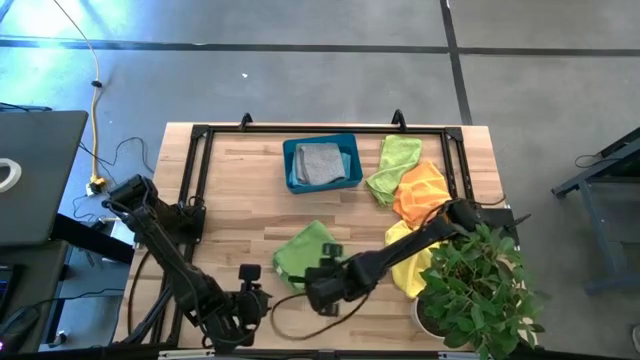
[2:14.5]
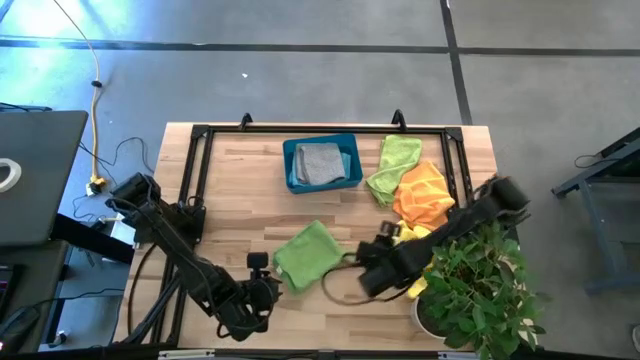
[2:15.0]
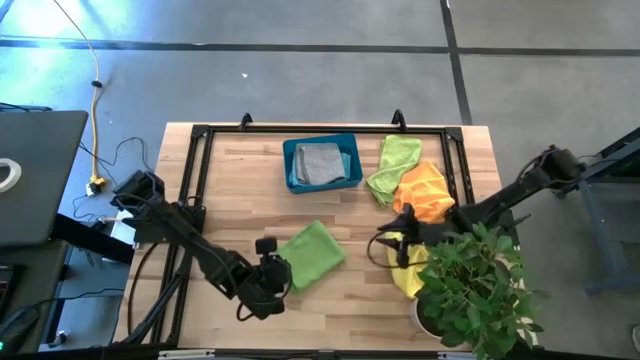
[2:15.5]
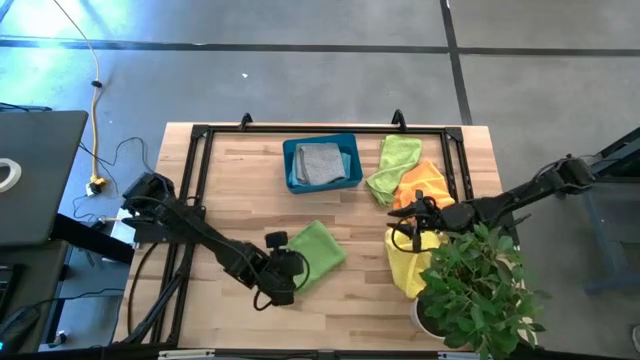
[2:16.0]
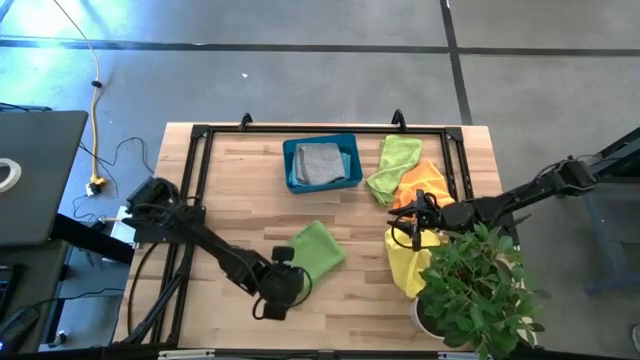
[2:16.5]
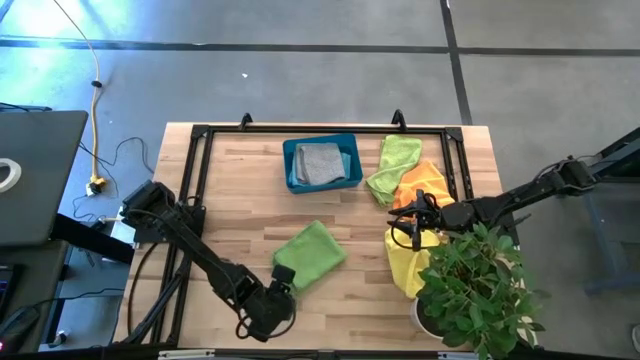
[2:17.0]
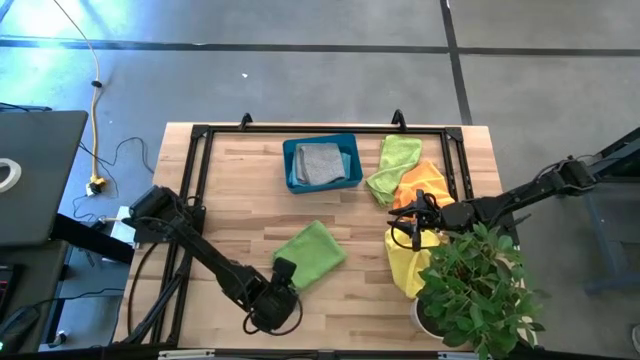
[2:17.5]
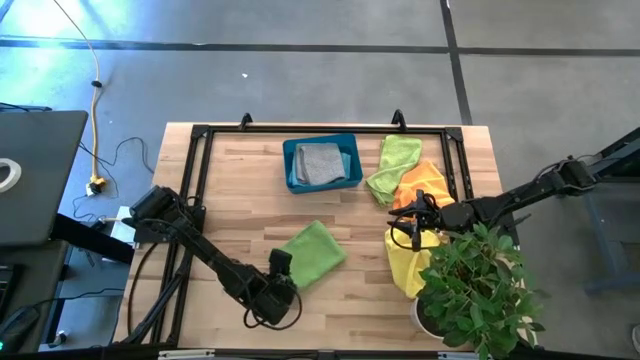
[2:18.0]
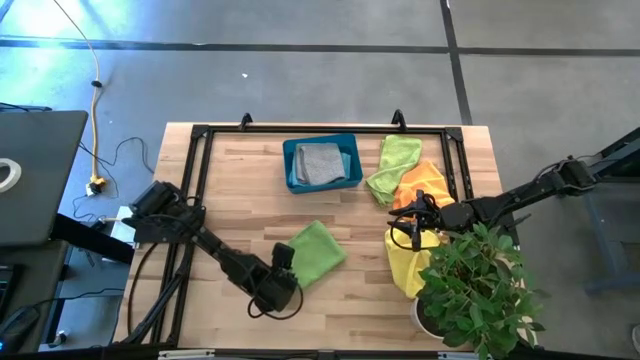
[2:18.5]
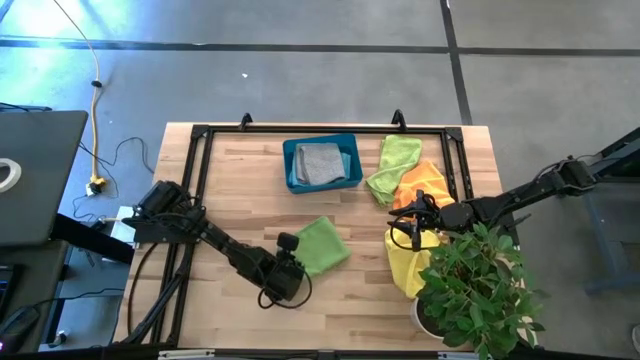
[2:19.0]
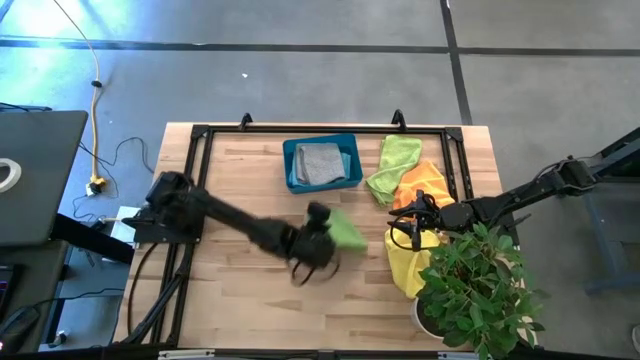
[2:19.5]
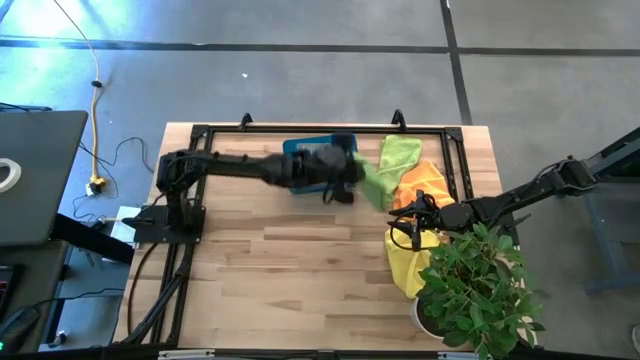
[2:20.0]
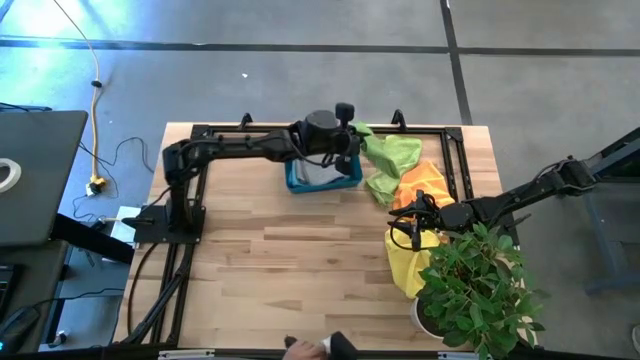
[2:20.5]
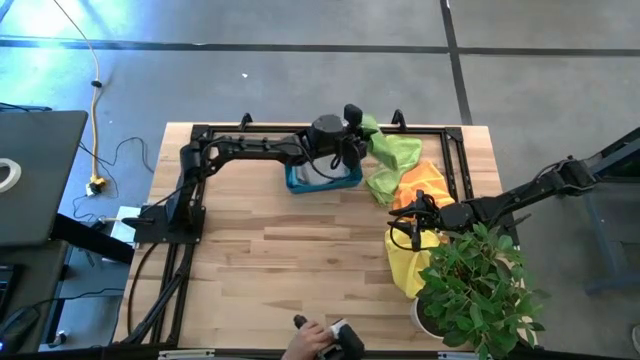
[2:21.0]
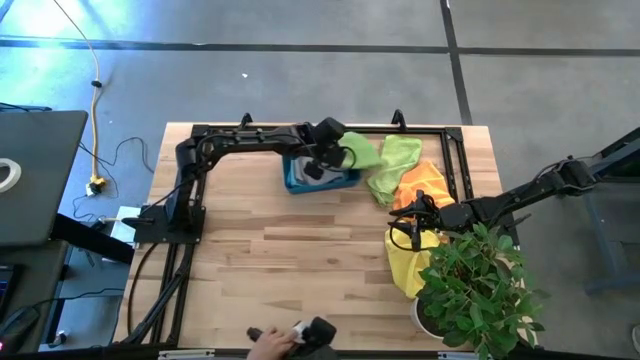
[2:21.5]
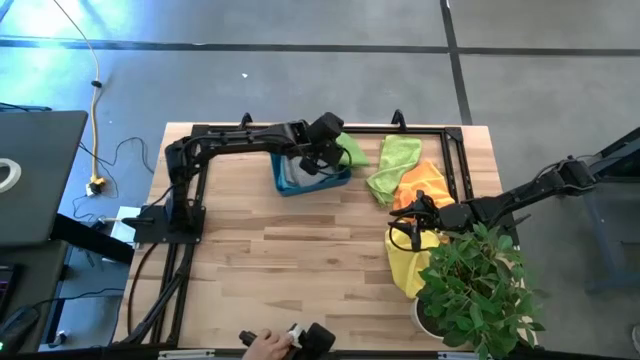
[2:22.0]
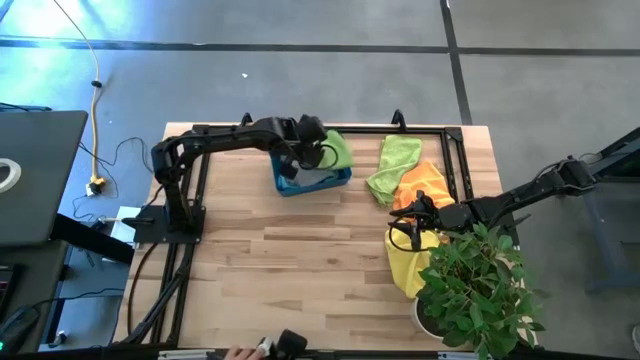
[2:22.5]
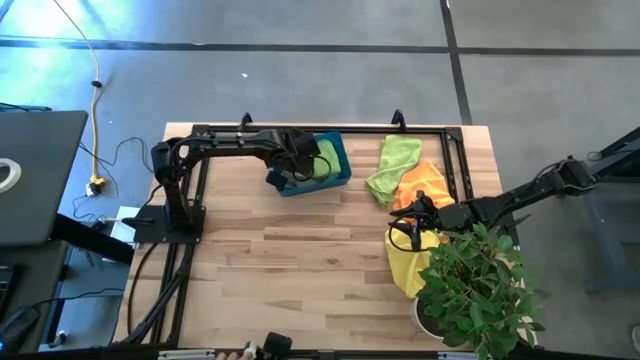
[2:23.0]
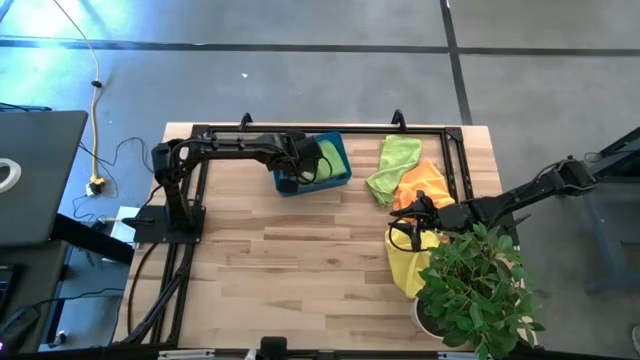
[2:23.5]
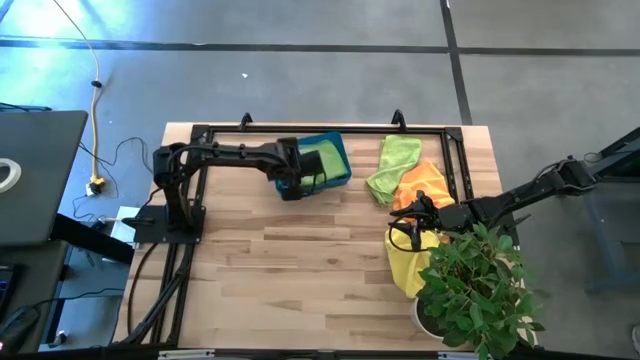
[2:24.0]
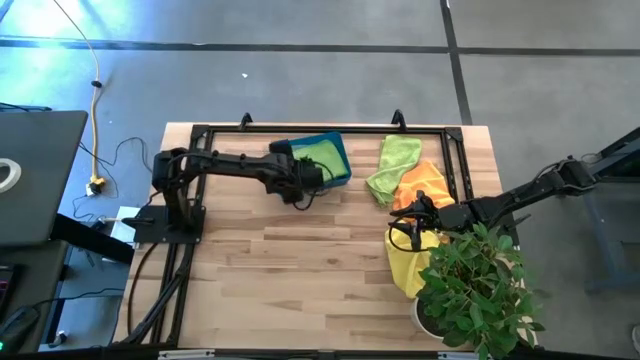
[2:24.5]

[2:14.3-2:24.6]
Task: Fold microfiber towels
Stack the folded green microfiber cloth on the gray microfiber cloth in the blue bin

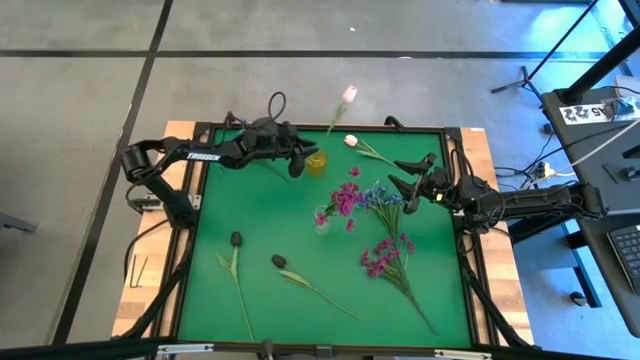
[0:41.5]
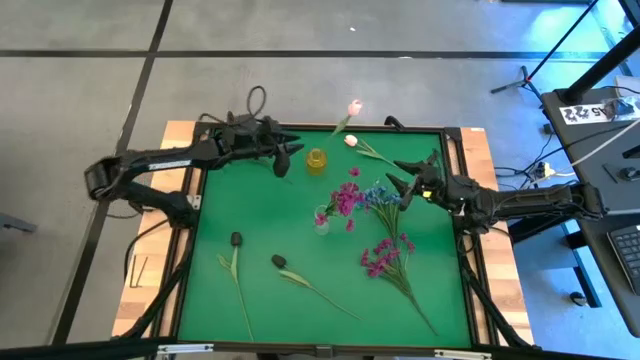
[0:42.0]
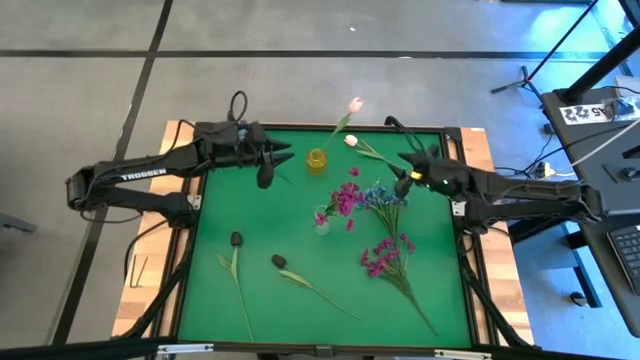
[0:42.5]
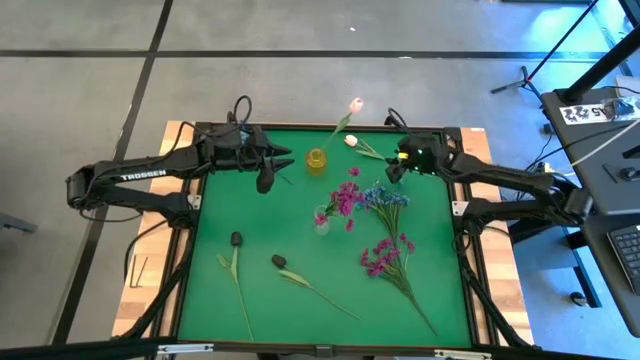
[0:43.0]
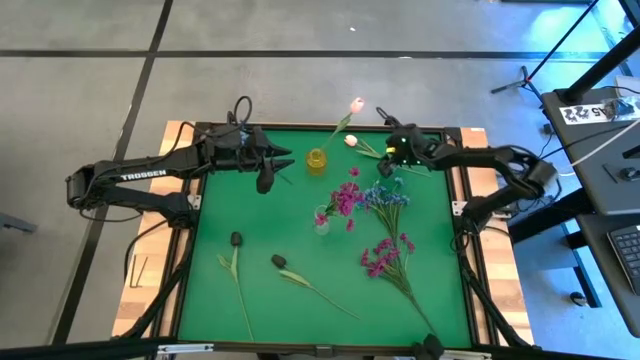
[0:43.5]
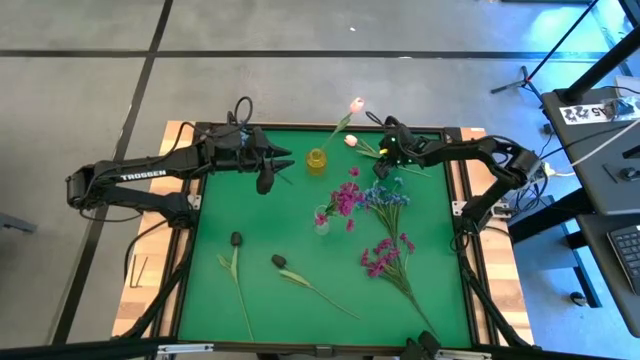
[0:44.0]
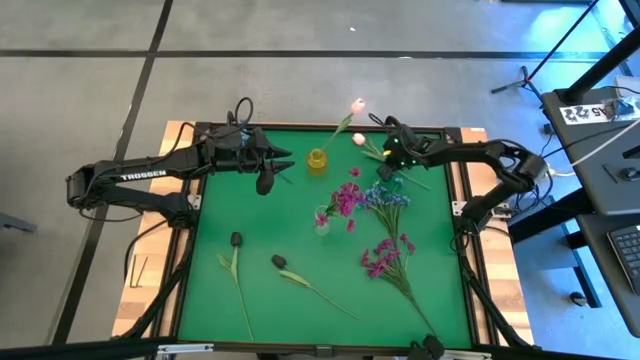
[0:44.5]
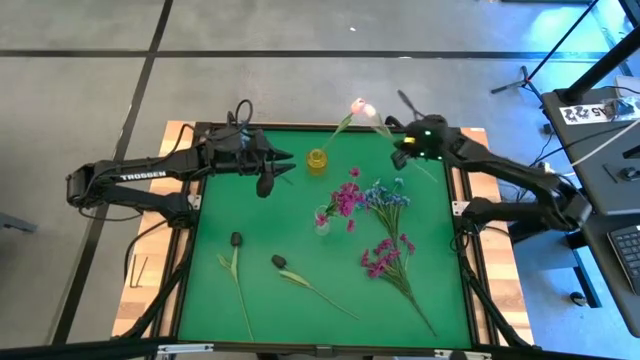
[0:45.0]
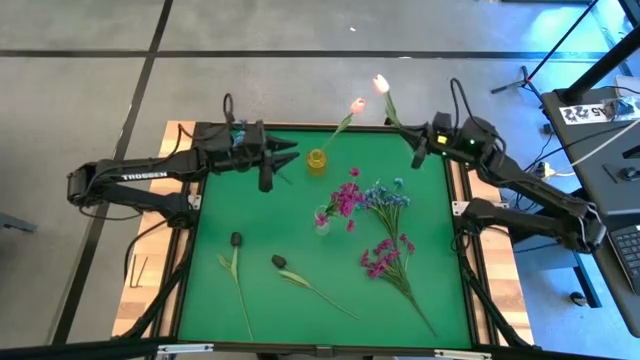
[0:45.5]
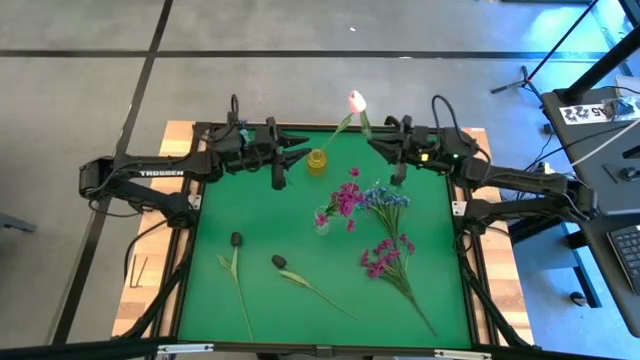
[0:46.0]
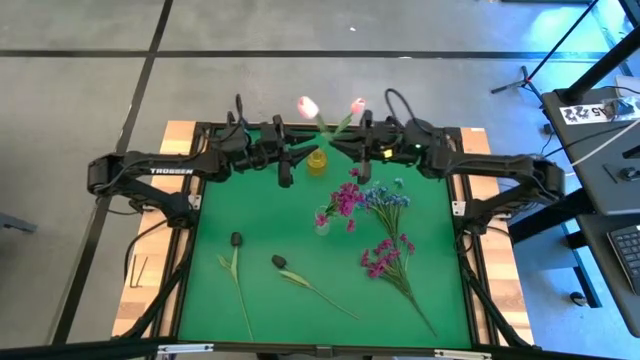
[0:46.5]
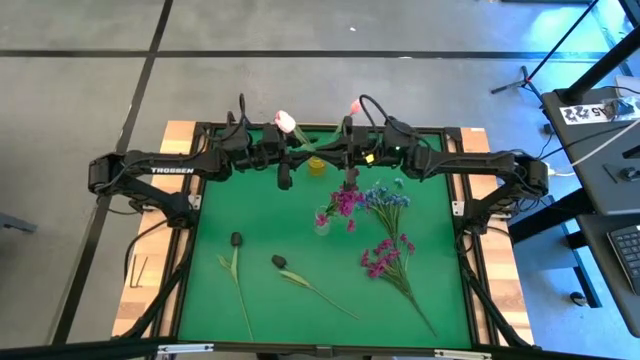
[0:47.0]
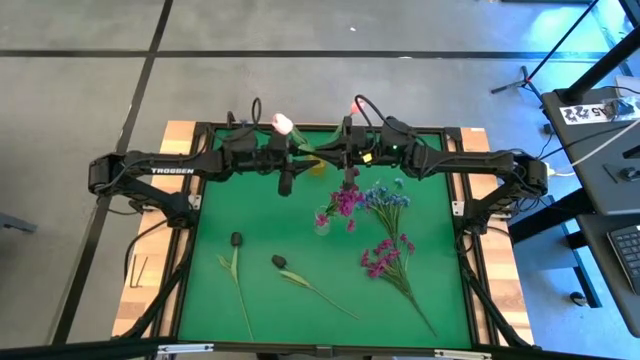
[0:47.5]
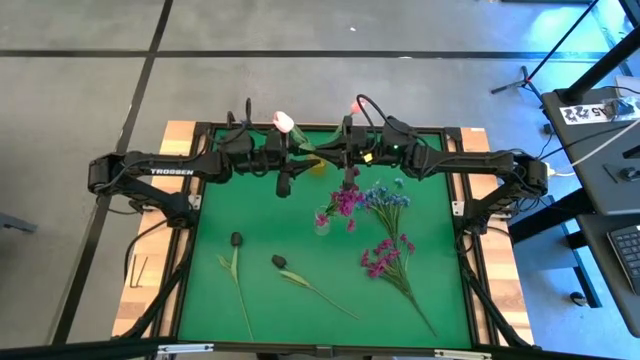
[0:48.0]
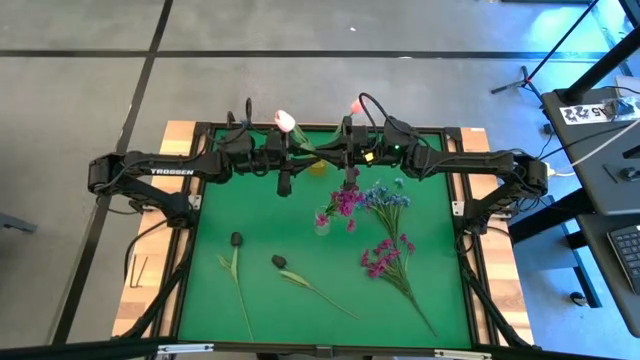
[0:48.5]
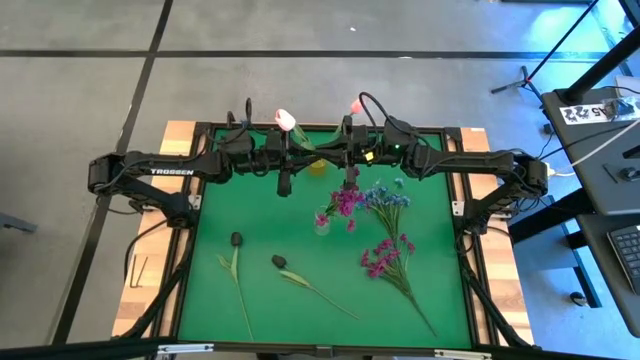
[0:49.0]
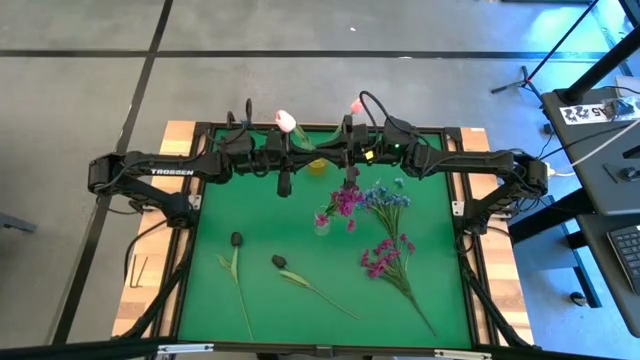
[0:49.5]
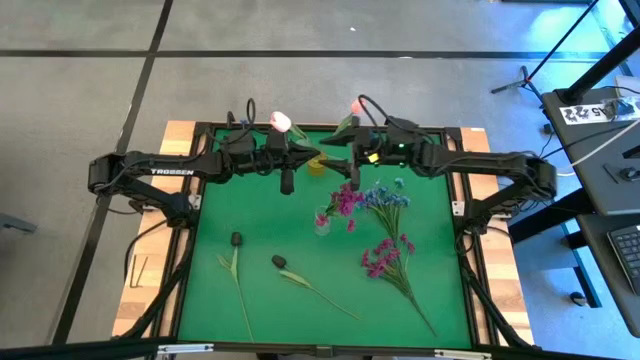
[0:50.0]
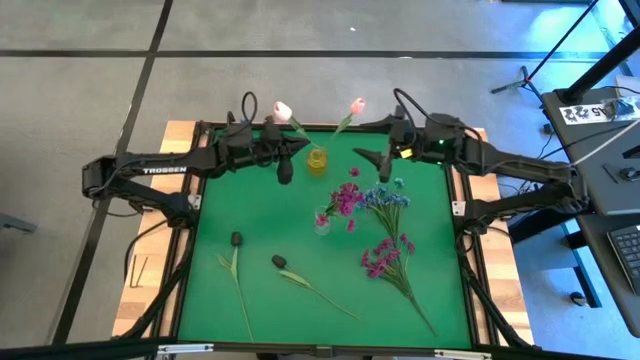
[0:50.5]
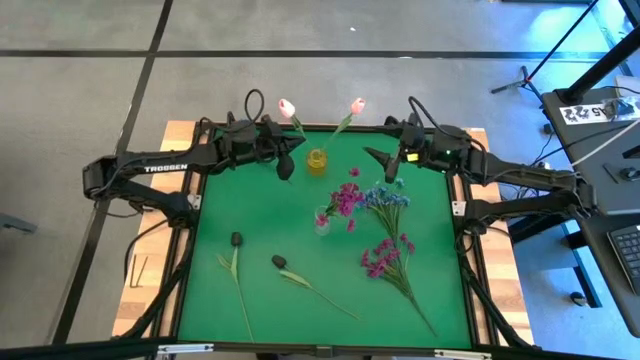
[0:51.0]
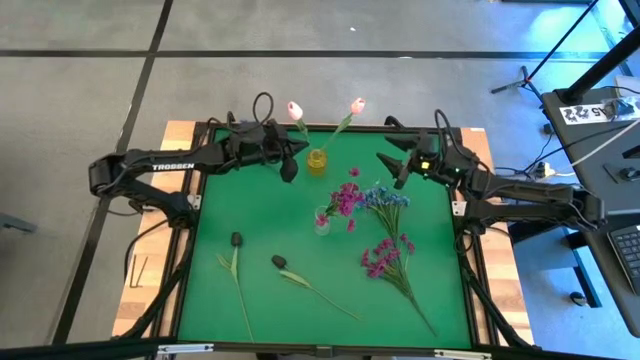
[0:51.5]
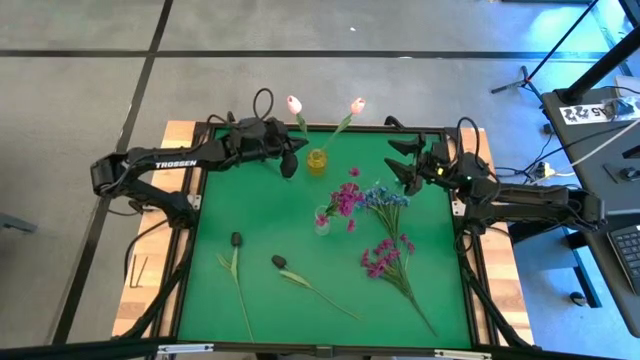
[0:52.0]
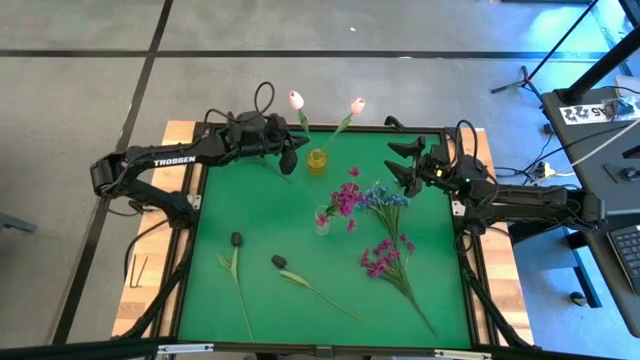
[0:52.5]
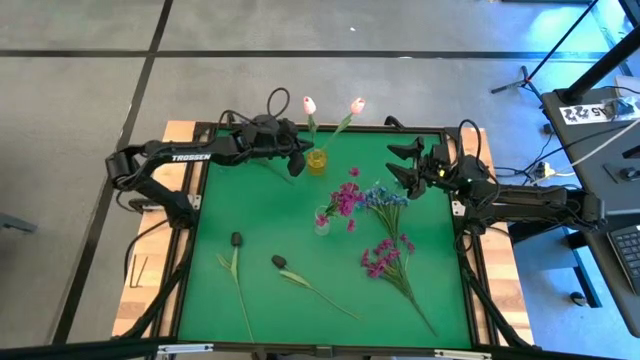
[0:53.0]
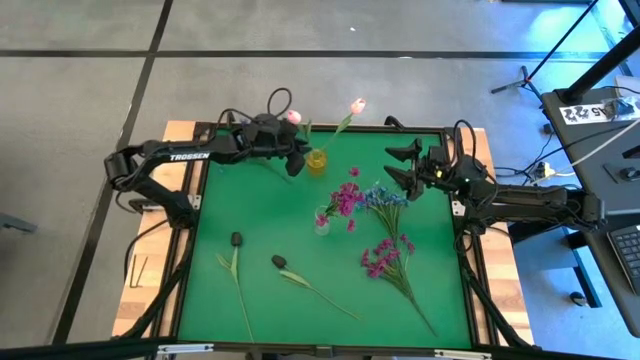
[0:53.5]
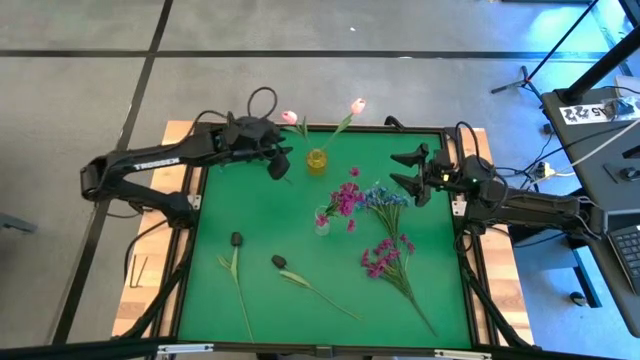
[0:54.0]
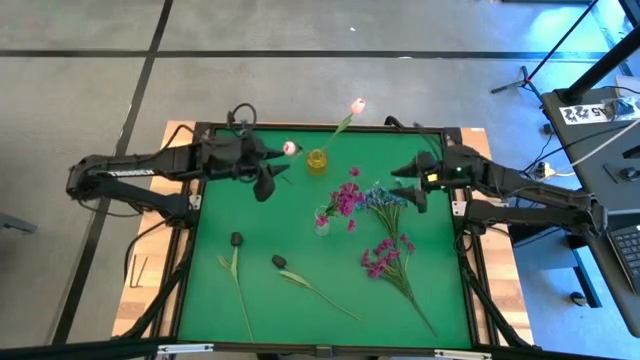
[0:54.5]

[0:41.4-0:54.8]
Task: Sort flowers into vase by color
Put the pink flower into the yellow vase
